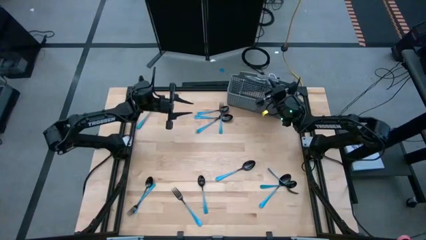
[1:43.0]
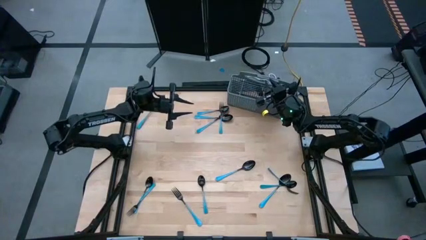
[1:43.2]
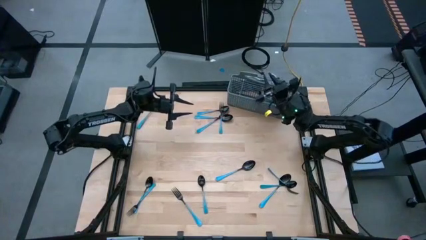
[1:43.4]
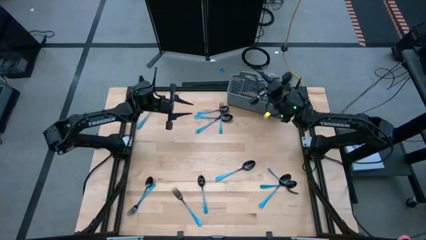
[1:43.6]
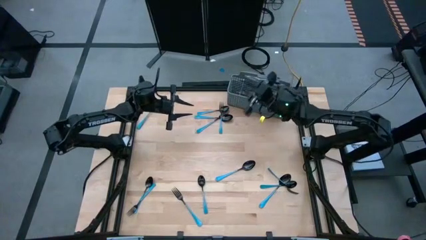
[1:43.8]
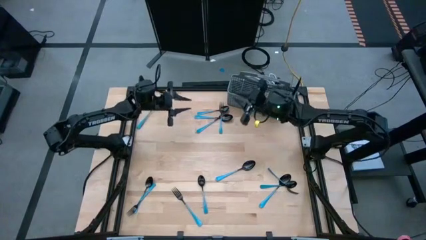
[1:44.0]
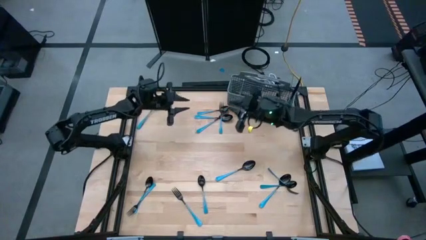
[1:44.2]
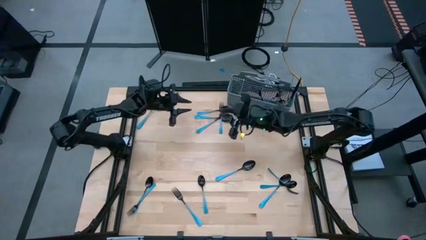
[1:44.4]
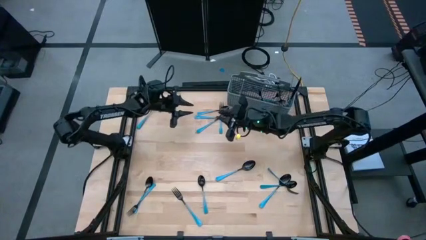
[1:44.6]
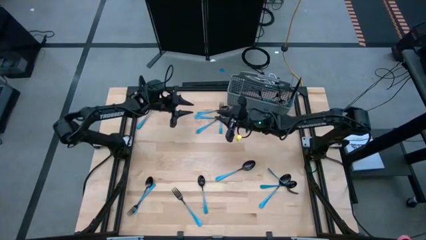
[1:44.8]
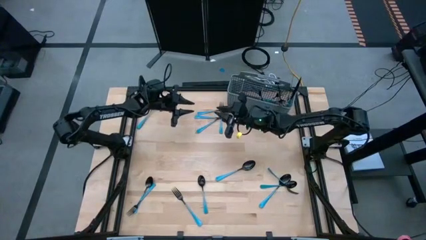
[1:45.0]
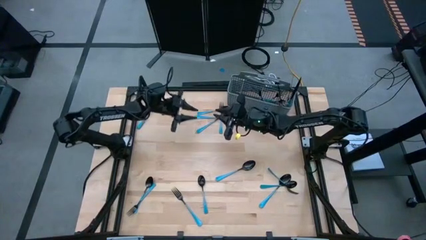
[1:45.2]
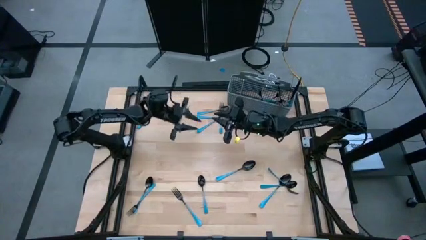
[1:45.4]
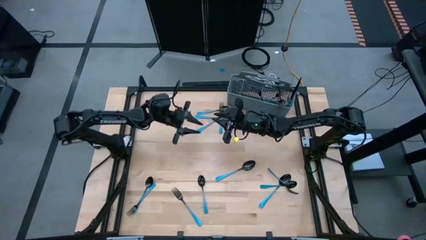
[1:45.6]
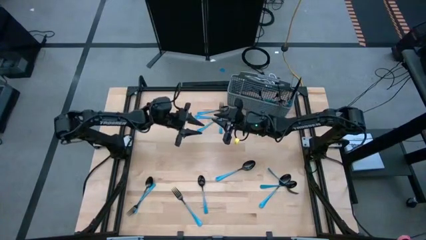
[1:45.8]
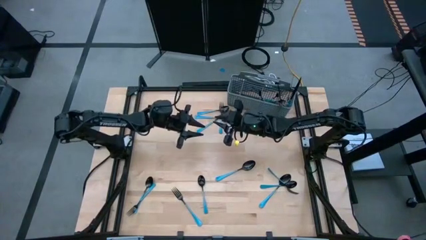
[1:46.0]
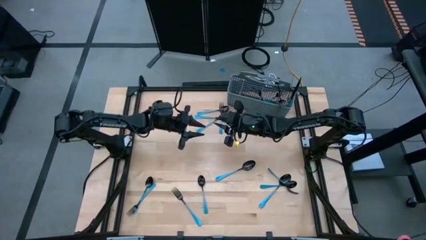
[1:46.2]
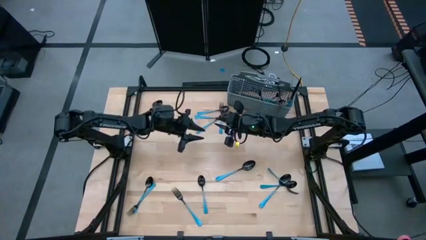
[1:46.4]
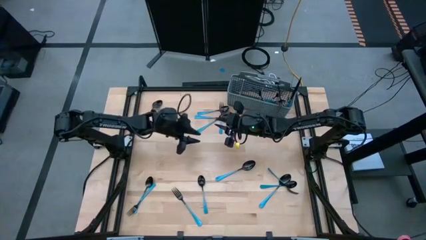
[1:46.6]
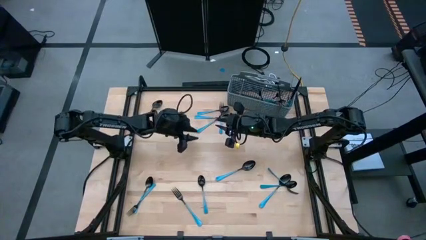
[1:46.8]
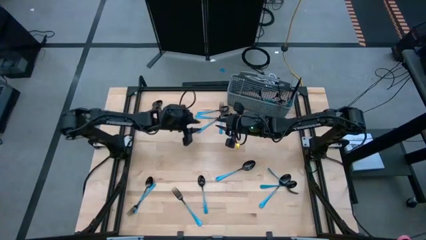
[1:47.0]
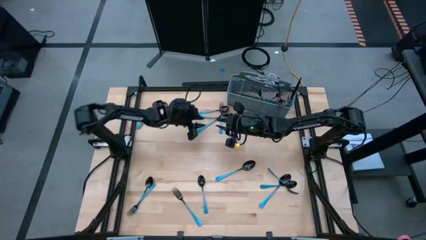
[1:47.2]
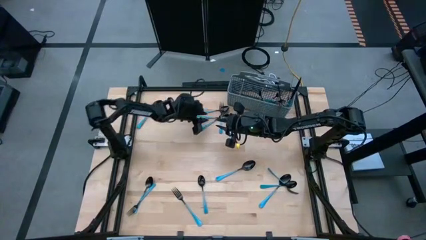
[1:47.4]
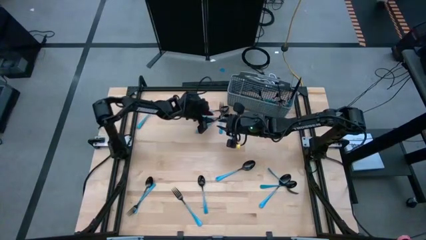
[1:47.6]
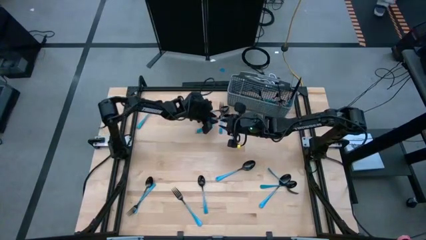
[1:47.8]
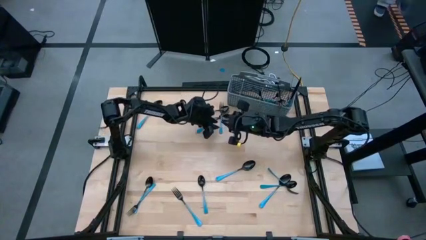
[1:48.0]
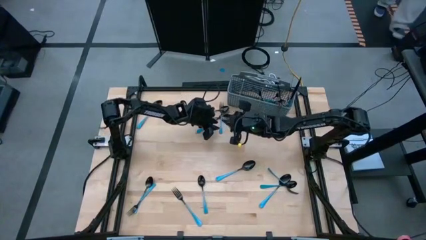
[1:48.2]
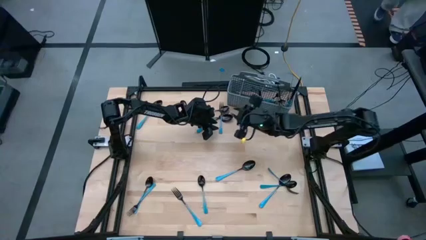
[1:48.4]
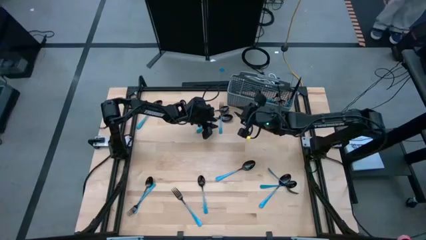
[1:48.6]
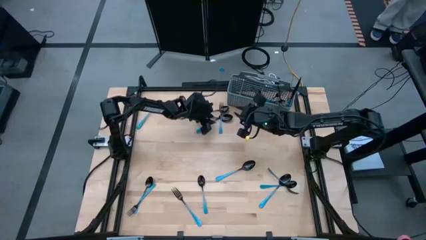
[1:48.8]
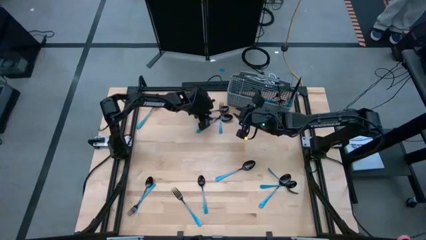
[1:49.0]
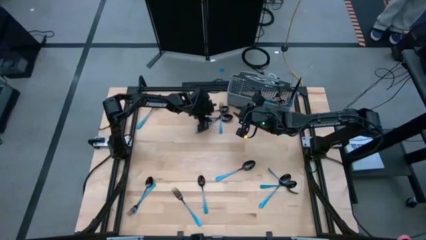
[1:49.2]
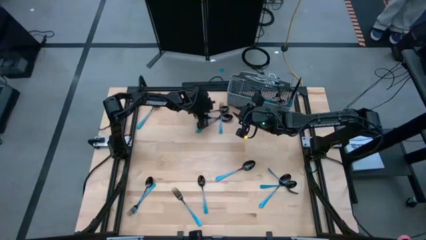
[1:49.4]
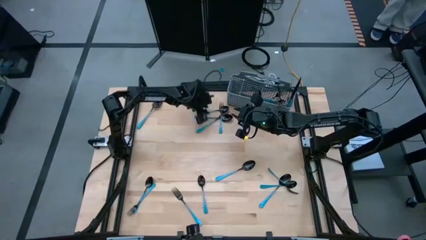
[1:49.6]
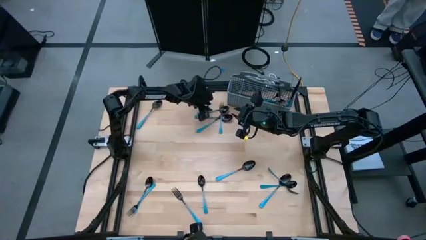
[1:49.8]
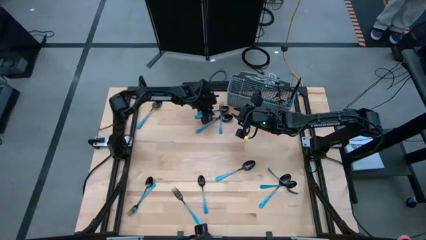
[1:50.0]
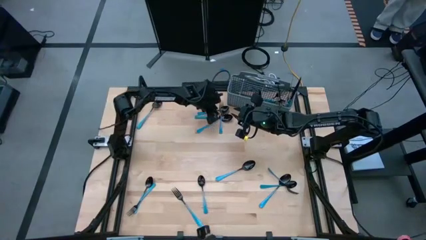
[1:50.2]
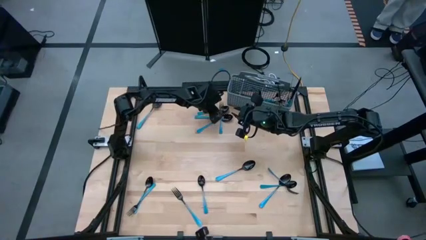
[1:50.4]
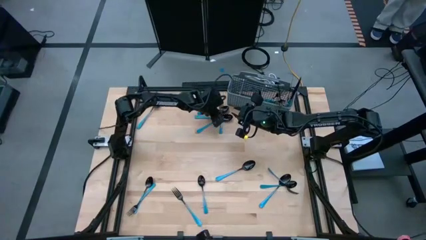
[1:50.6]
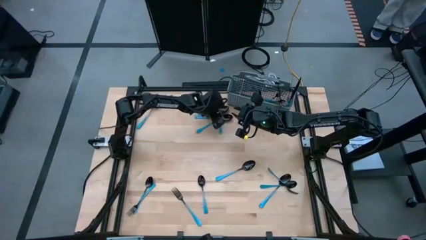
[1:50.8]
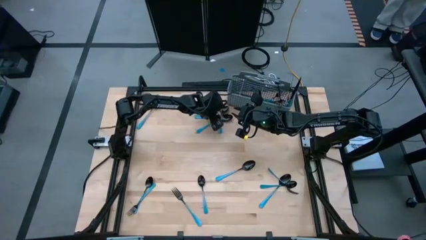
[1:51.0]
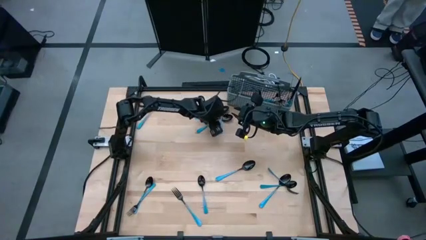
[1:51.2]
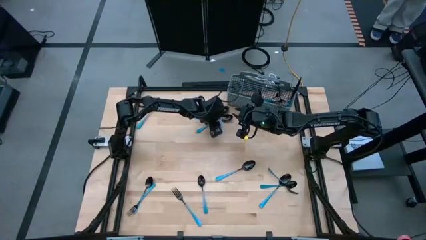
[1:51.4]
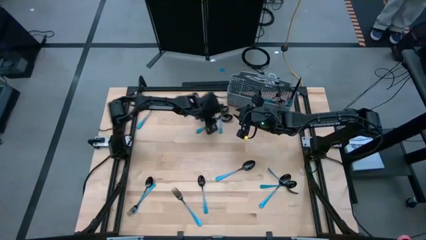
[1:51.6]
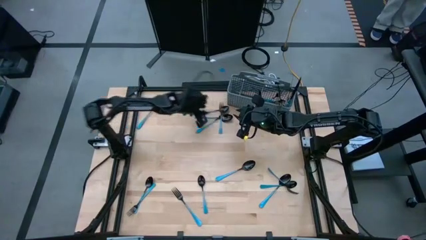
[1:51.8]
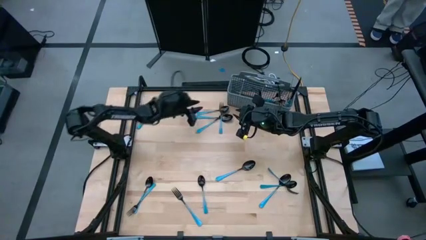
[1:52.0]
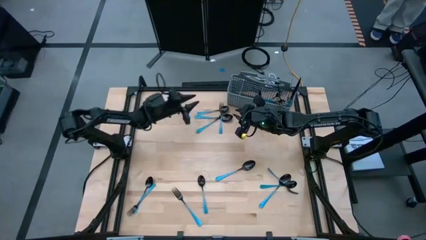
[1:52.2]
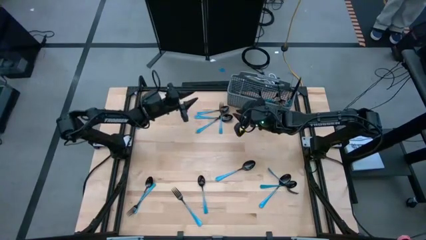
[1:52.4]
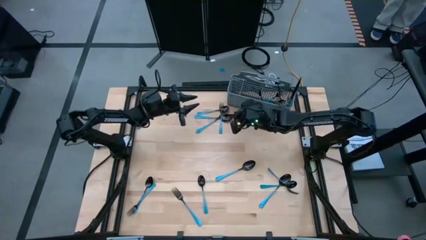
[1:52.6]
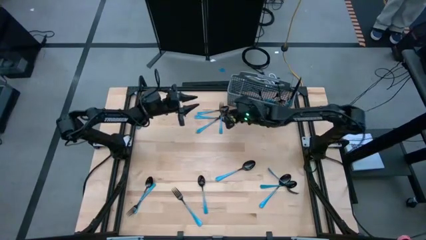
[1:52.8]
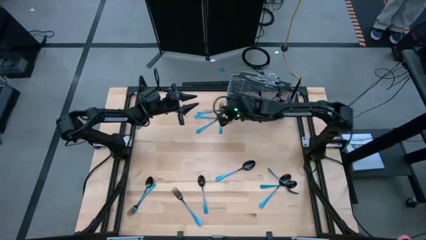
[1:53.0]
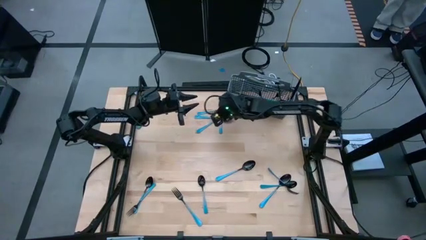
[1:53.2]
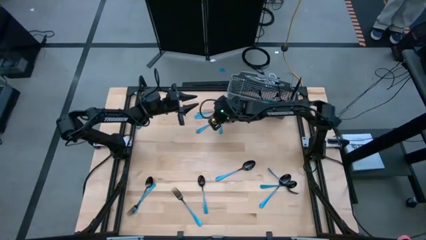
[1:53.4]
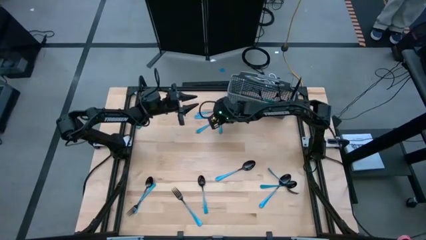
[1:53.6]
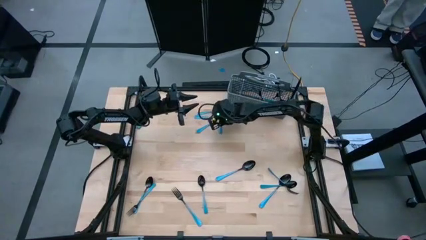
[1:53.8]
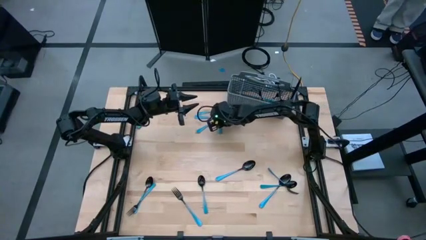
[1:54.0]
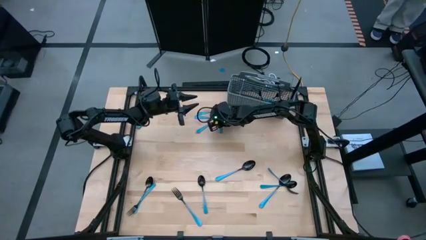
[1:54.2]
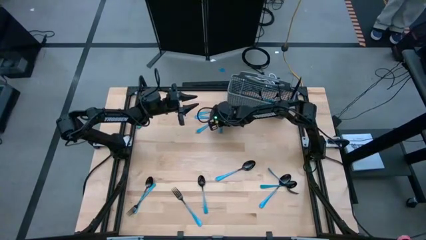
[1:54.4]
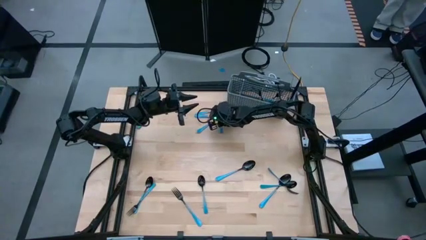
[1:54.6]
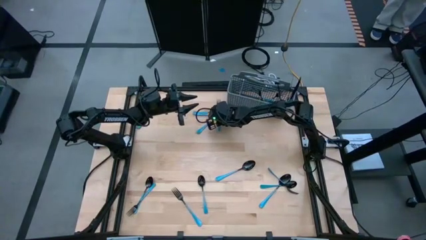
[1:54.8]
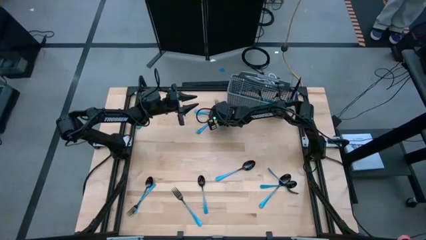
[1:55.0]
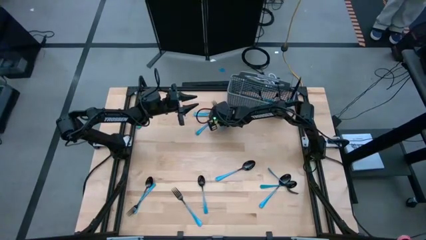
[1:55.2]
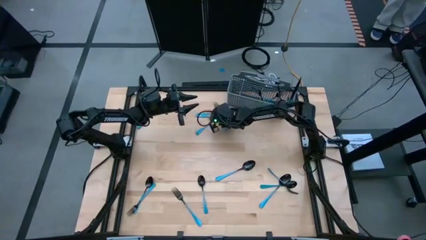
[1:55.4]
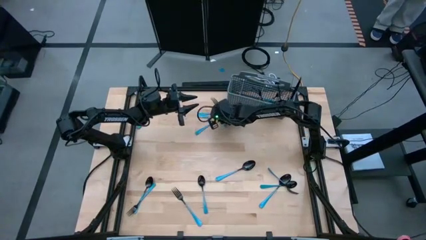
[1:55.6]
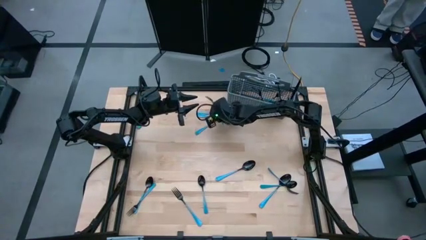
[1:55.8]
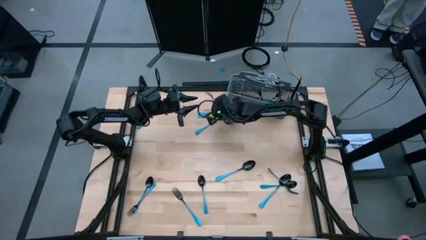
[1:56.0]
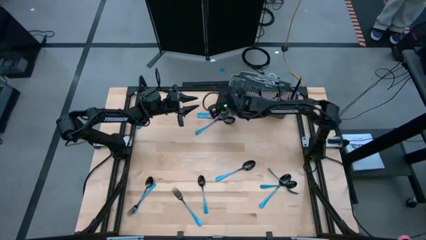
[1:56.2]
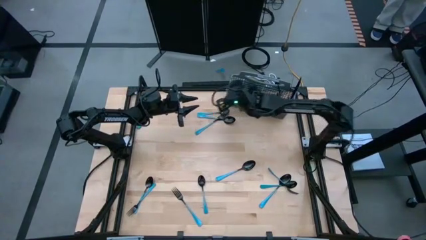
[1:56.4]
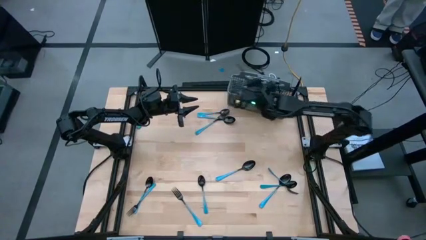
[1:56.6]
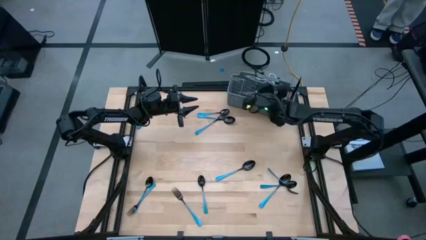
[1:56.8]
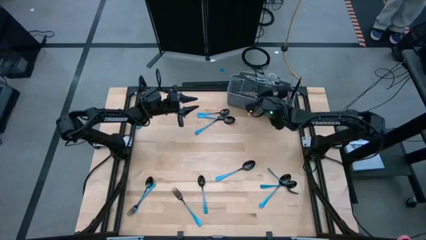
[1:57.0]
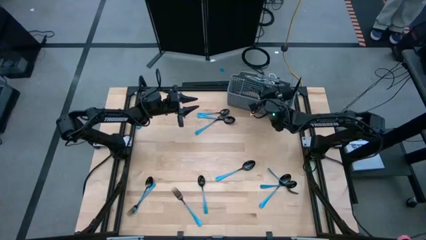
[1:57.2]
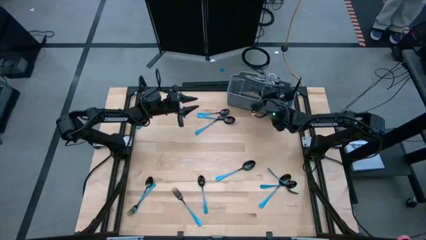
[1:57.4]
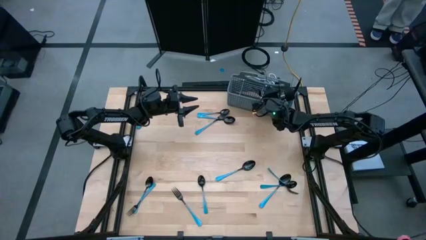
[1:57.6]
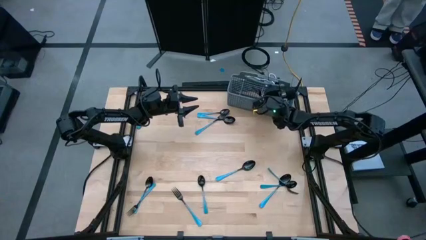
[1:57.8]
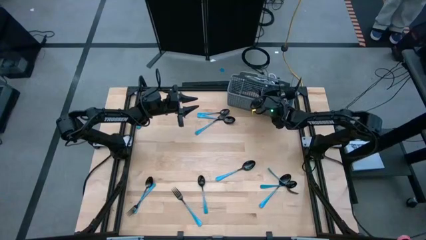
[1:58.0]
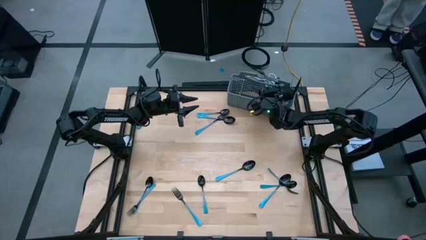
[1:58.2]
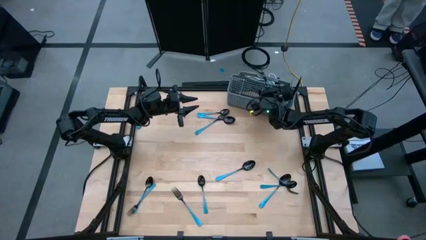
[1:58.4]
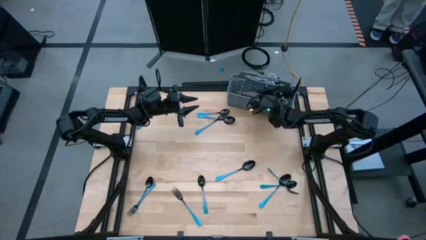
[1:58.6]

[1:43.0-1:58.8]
Task: Sort silverware
Put the blue fork into the middle of the blue utensil organizer
